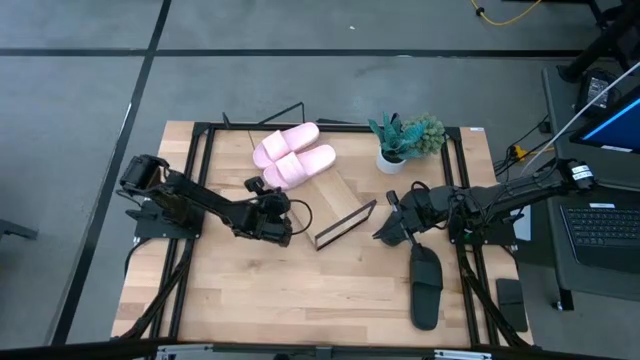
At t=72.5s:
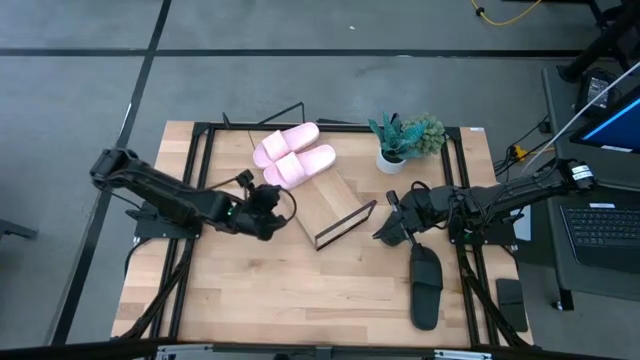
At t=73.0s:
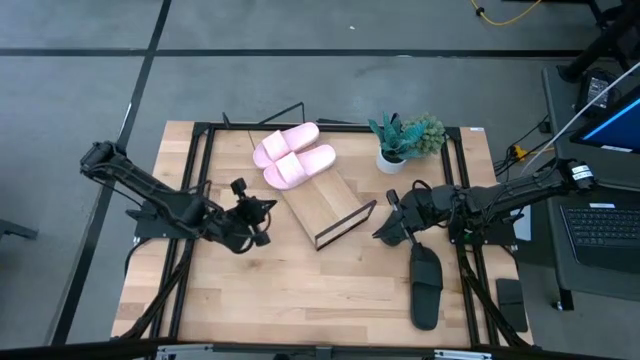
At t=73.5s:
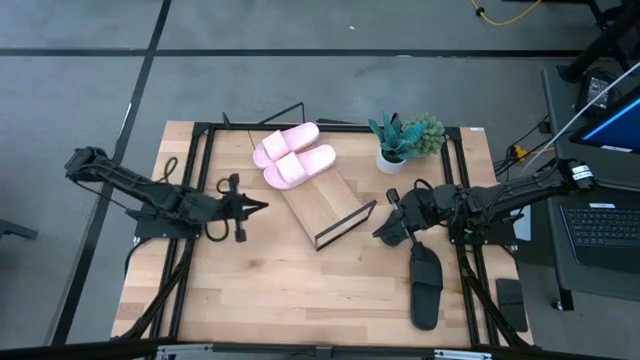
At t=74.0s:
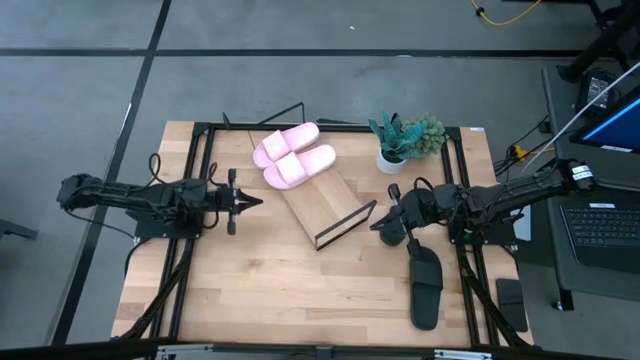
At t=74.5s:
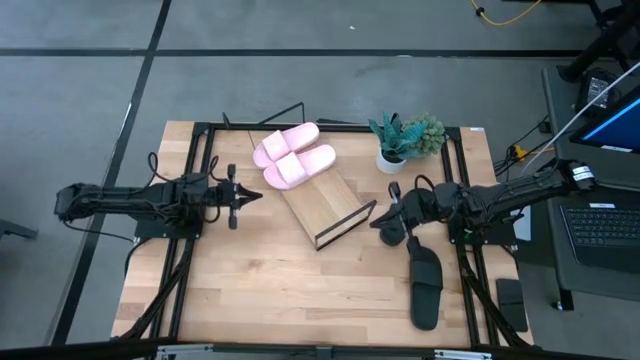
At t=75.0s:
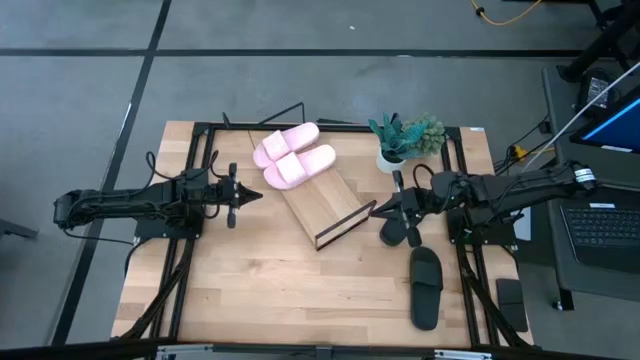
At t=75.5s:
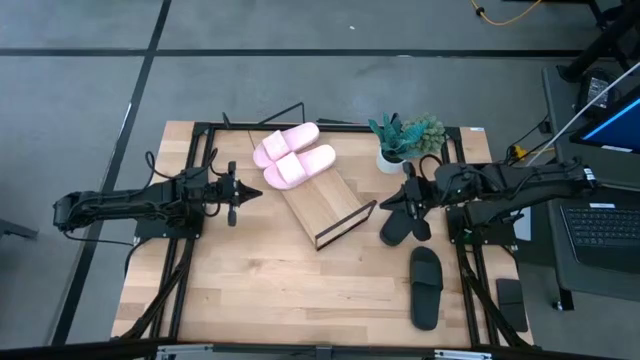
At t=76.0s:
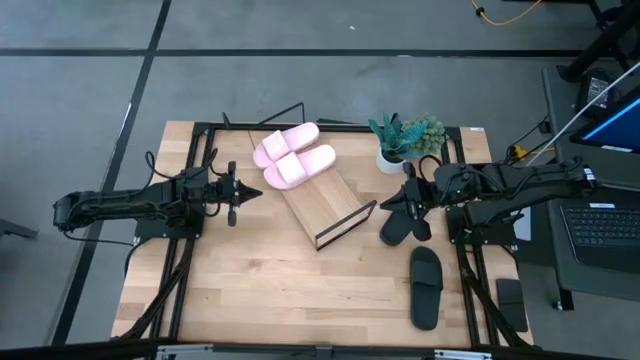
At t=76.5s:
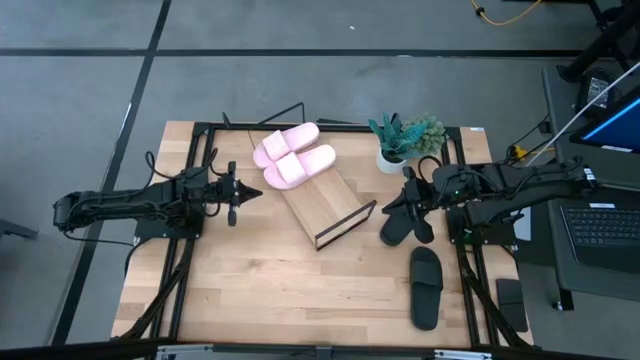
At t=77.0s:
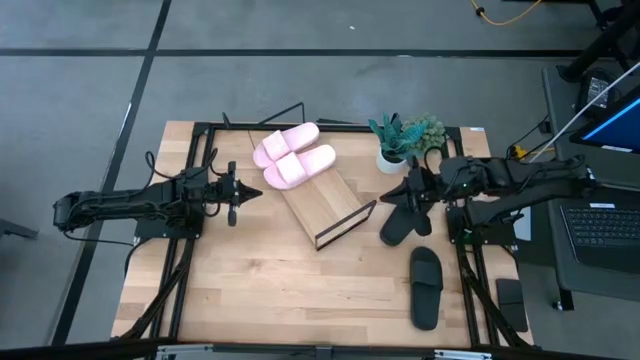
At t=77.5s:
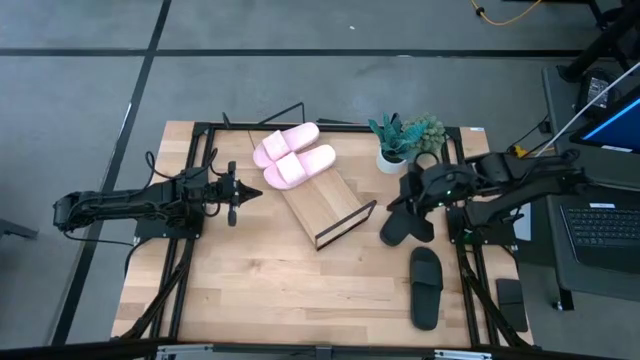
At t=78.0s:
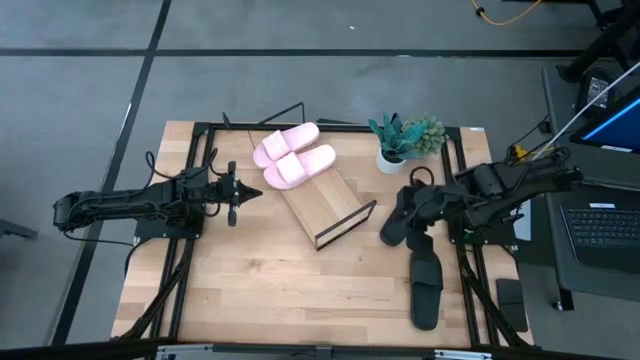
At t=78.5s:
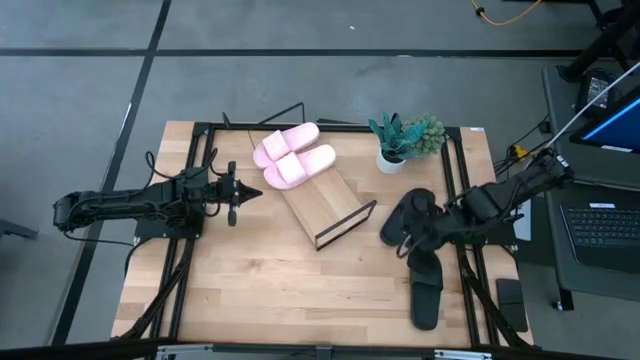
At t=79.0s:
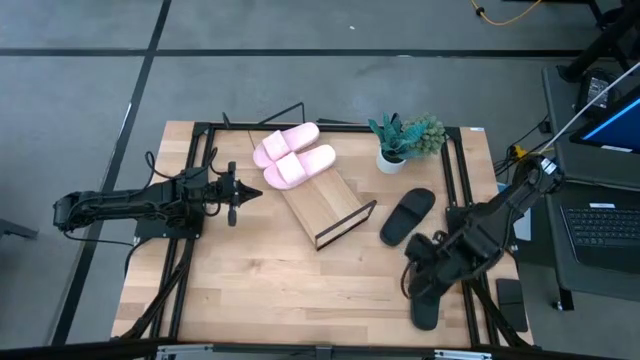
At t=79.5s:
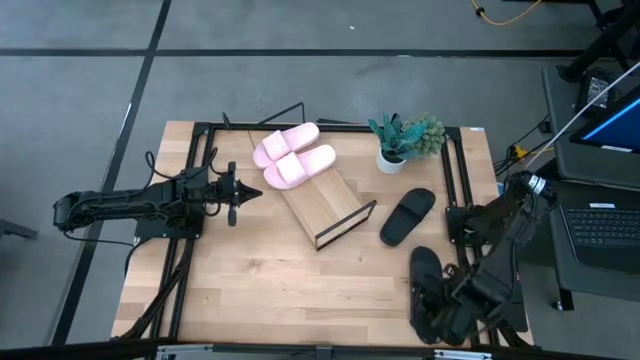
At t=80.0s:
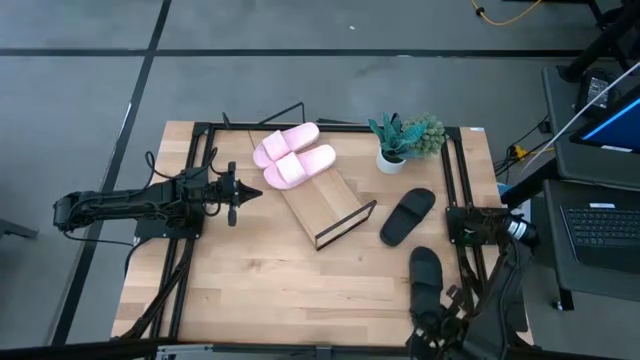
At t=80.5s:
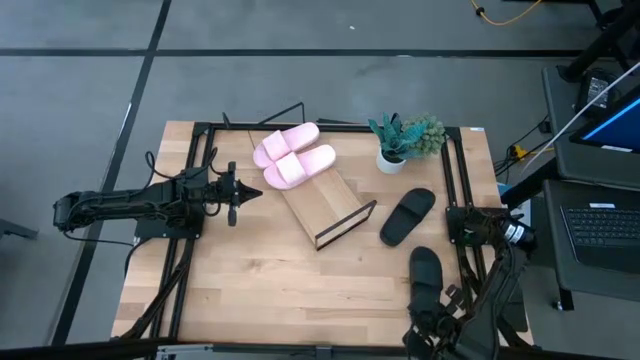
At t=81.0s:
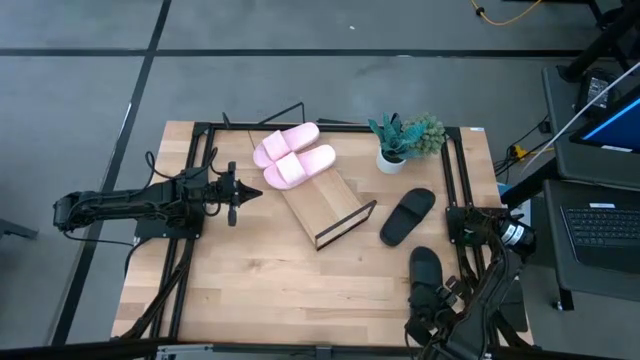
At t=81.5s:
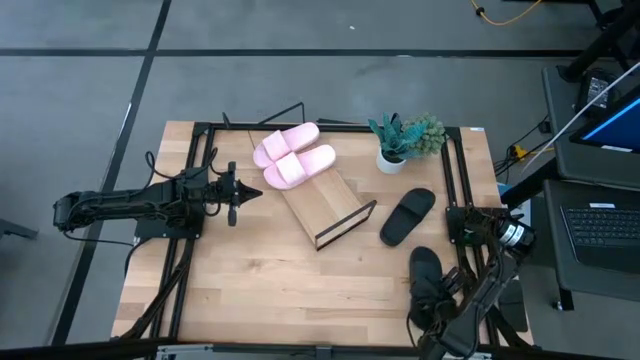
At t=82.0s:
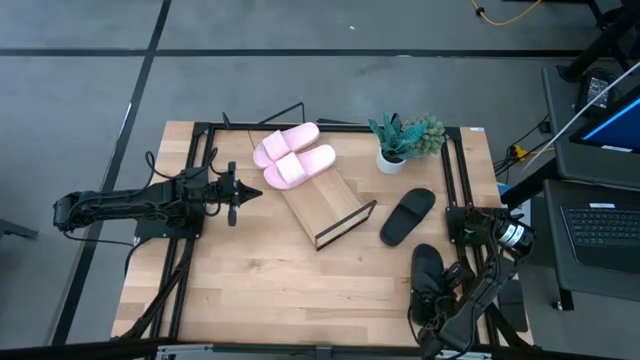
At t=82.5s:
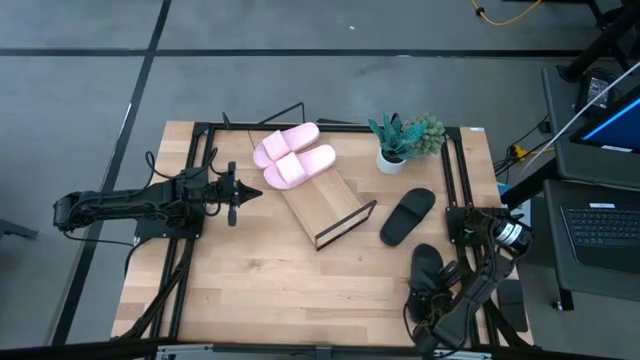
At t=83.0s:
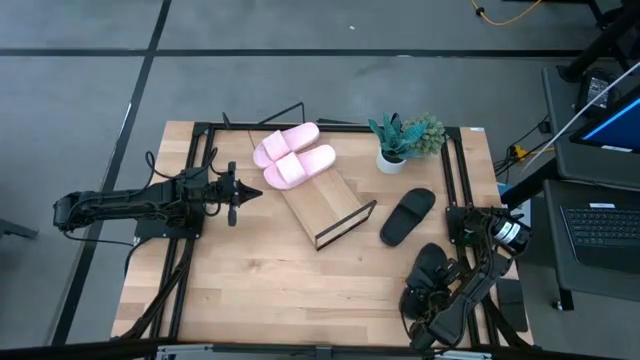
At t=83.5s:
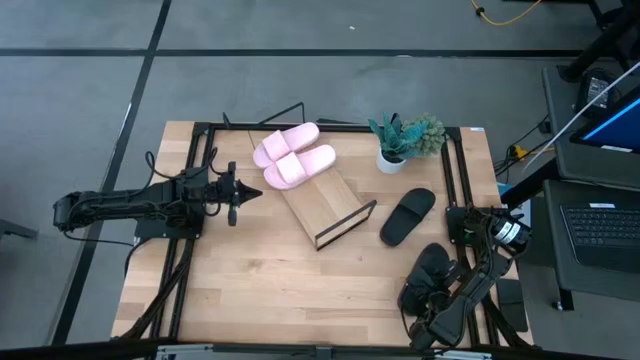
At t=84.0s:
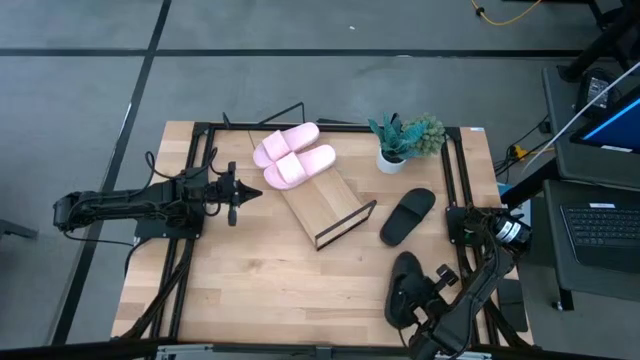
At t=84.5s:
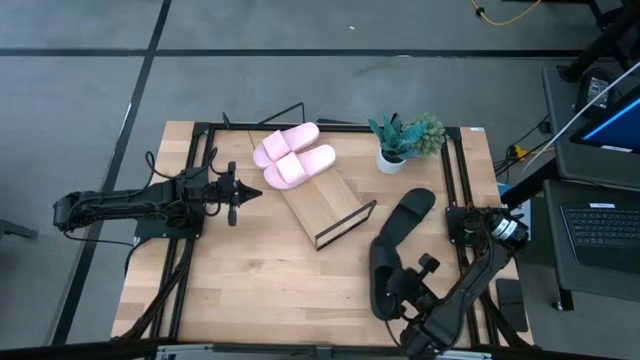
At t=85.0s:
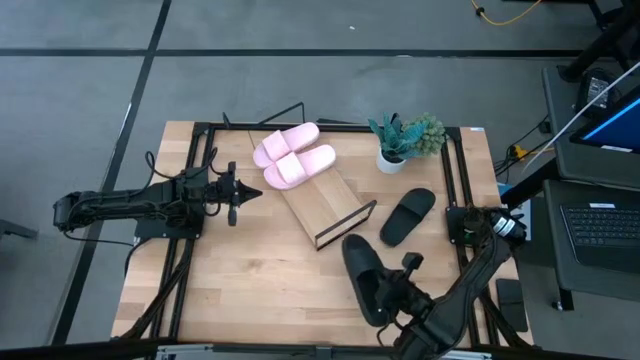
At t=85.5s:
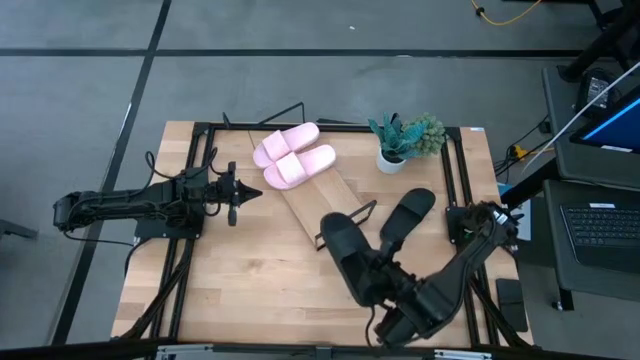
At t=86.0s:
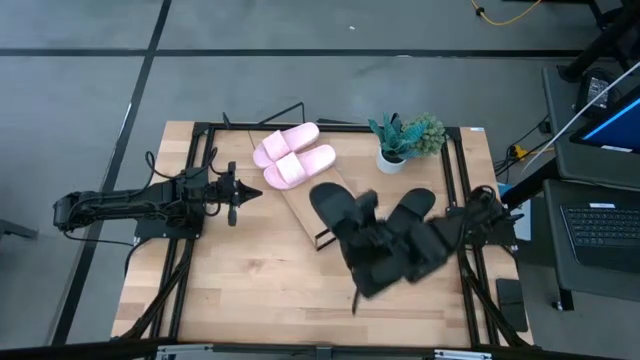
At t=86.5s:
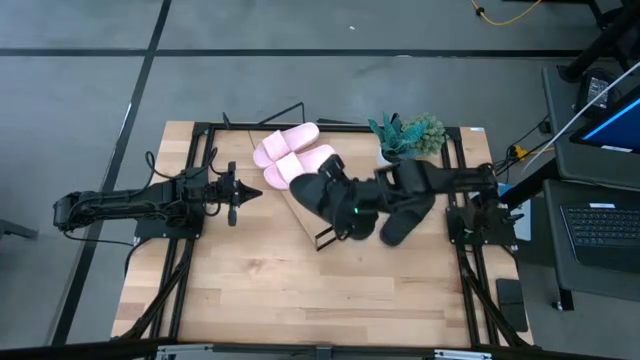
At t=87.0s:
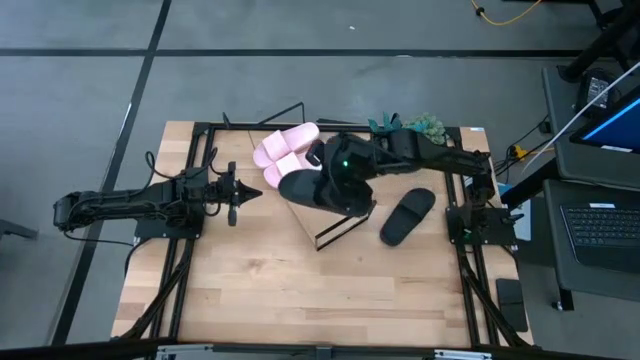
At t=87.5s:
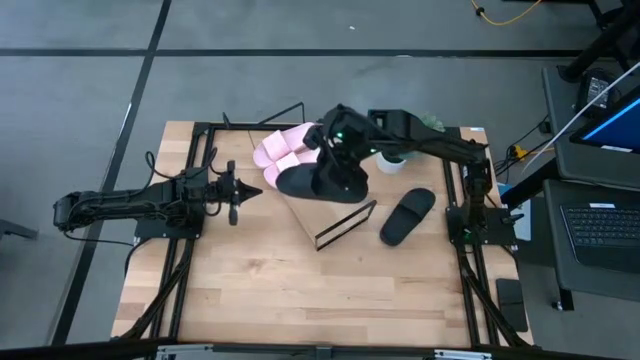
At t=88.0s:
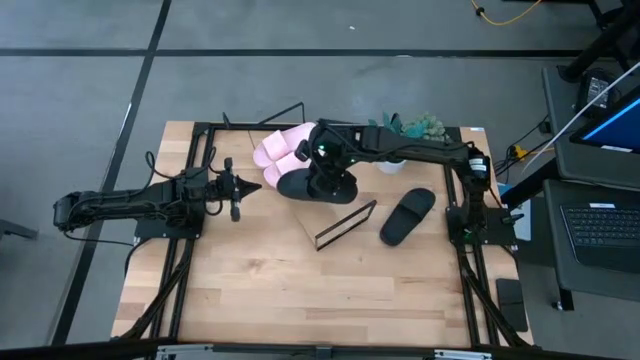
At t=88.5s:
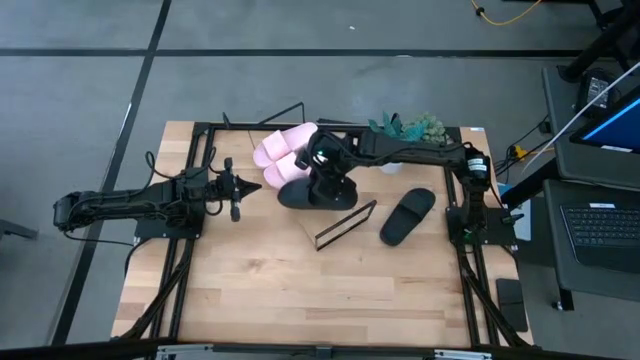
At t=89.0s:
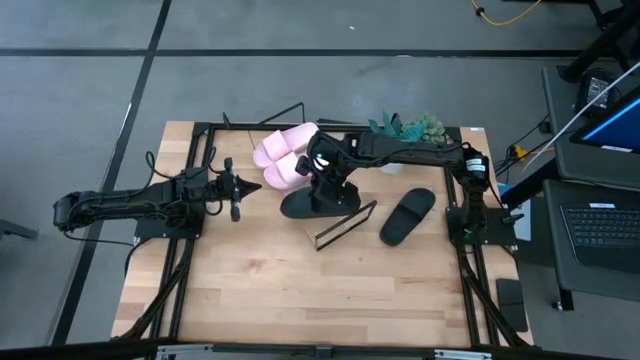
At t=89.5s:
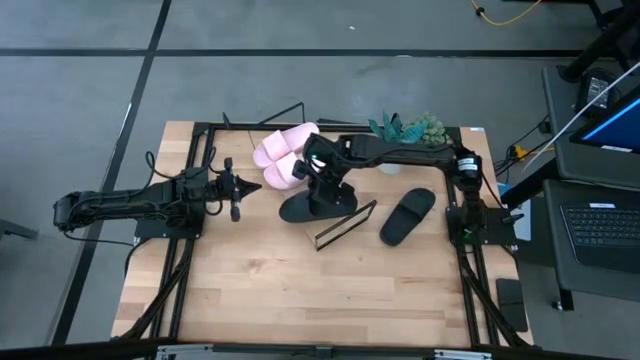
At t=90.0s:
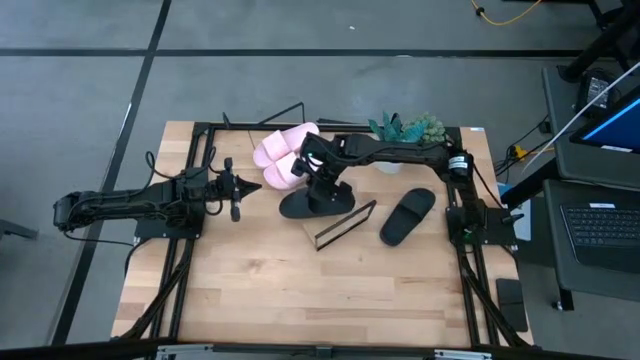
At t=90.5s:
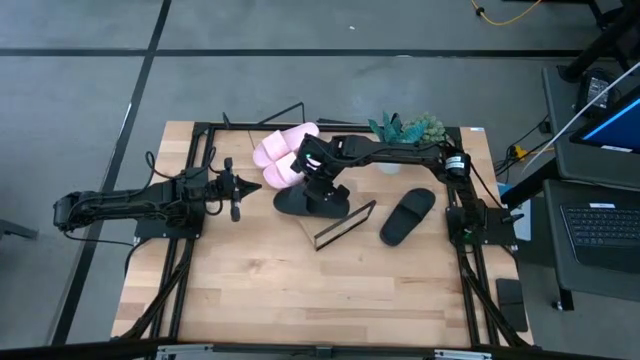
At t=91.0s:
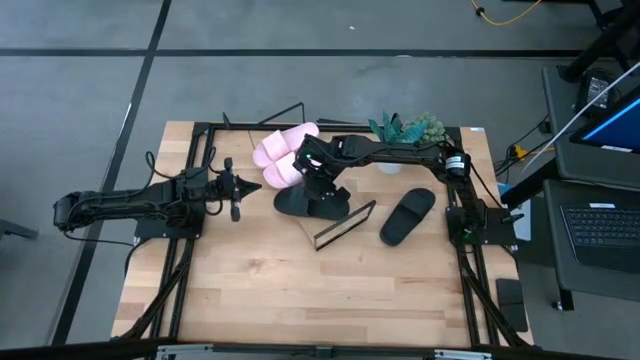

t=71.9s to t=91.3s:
Task: Pick and place slides into the shelf
Put the bottom black slides on the shelf
